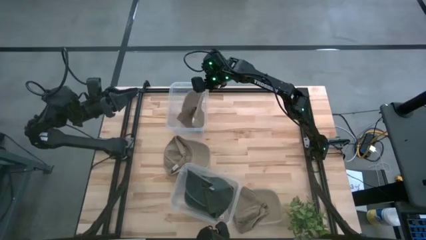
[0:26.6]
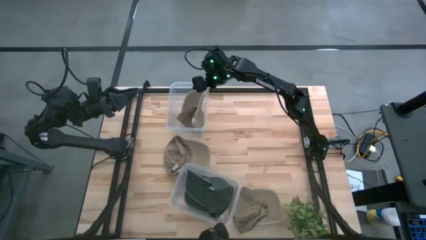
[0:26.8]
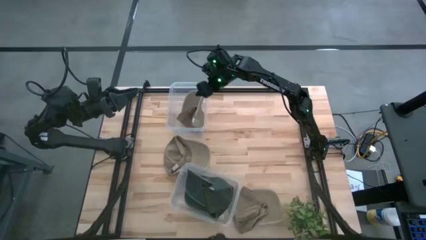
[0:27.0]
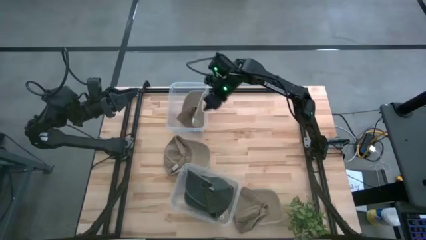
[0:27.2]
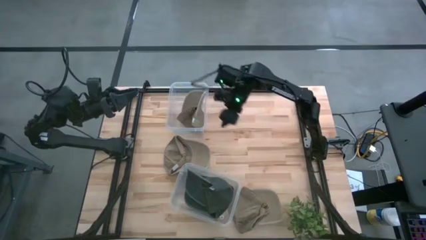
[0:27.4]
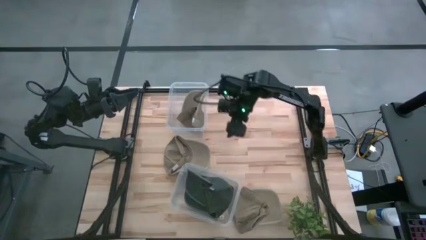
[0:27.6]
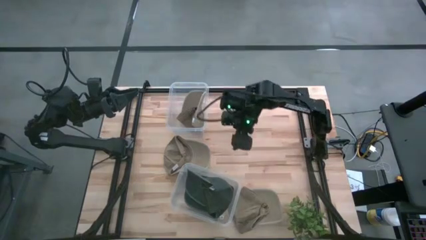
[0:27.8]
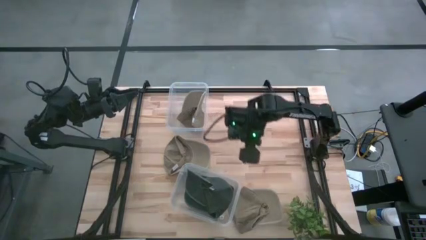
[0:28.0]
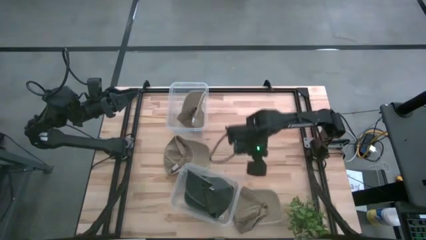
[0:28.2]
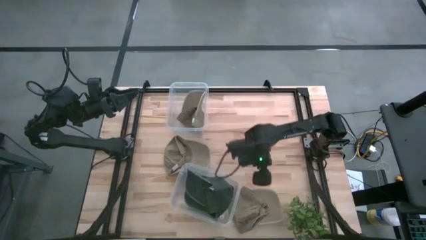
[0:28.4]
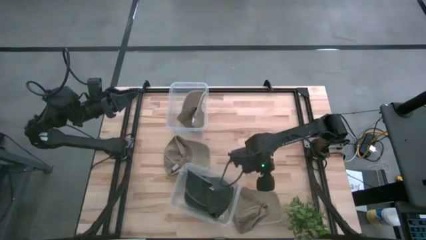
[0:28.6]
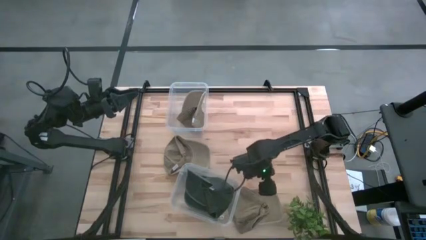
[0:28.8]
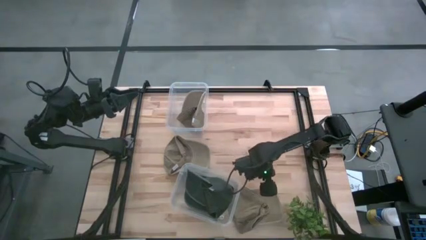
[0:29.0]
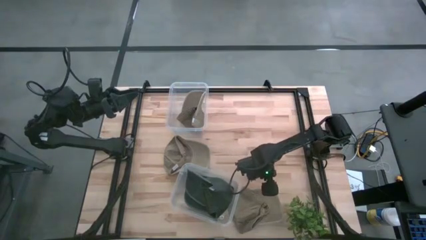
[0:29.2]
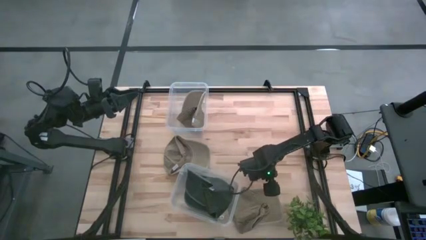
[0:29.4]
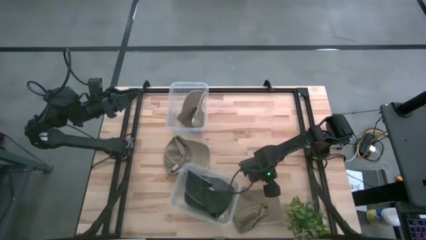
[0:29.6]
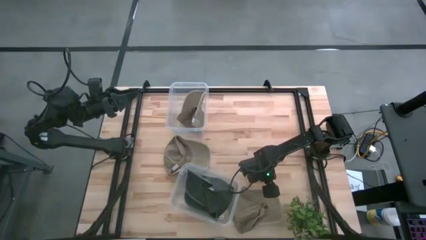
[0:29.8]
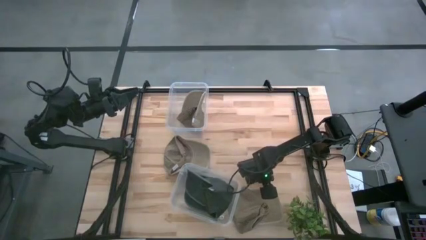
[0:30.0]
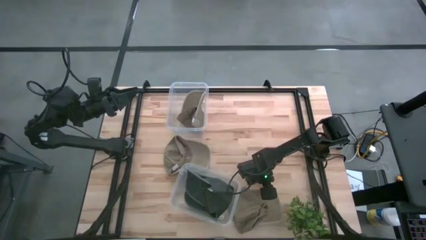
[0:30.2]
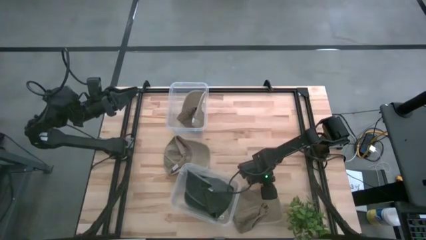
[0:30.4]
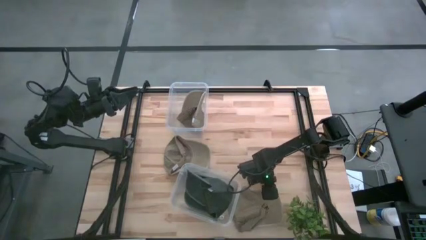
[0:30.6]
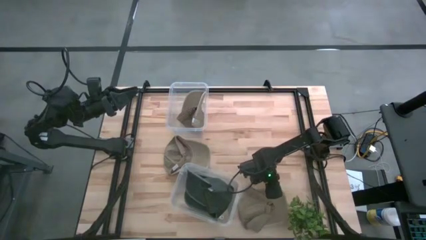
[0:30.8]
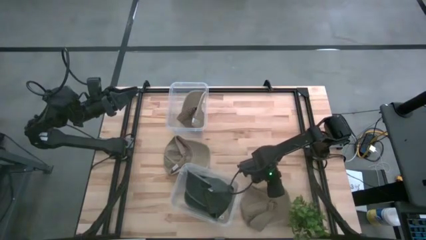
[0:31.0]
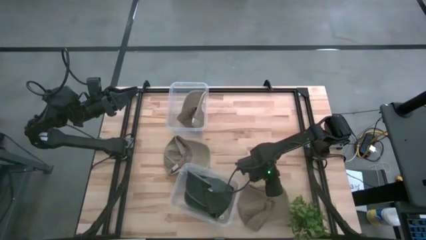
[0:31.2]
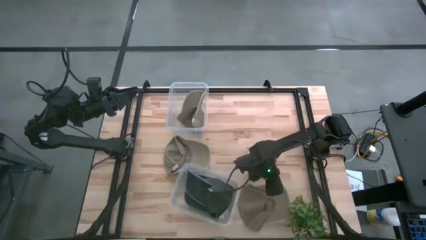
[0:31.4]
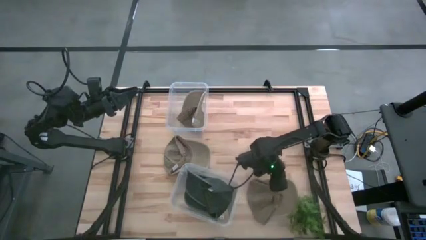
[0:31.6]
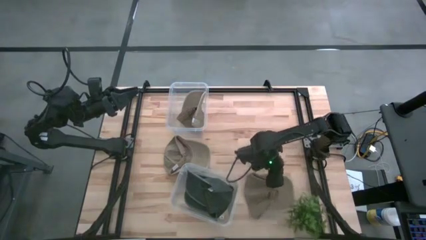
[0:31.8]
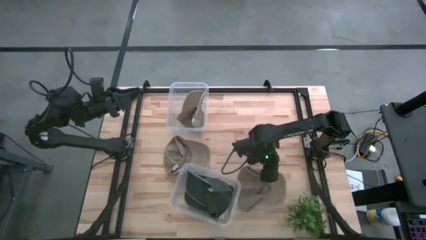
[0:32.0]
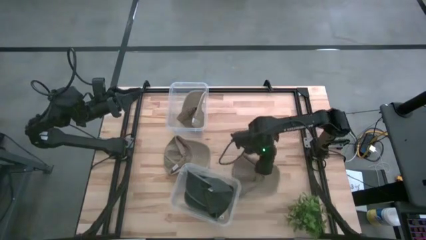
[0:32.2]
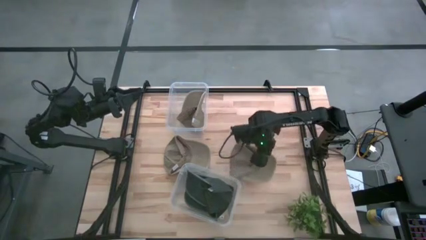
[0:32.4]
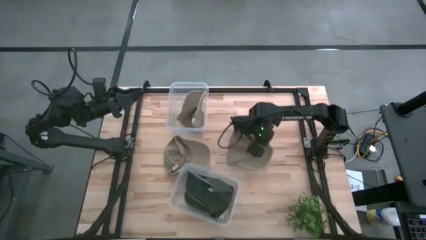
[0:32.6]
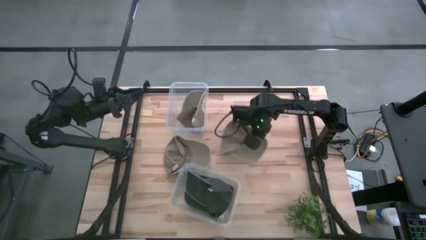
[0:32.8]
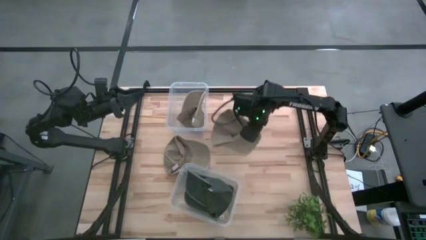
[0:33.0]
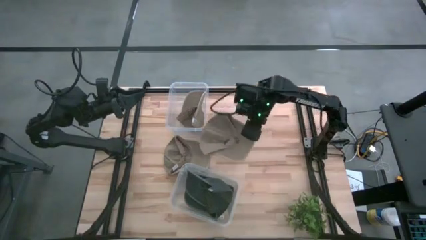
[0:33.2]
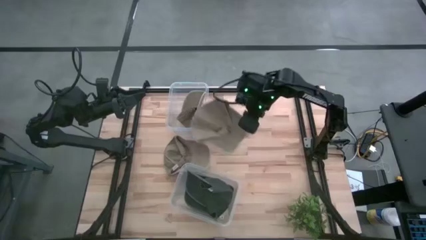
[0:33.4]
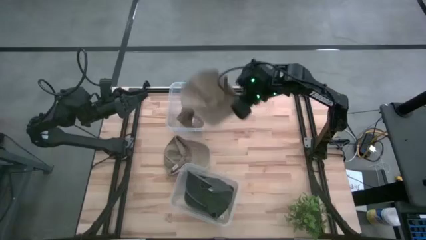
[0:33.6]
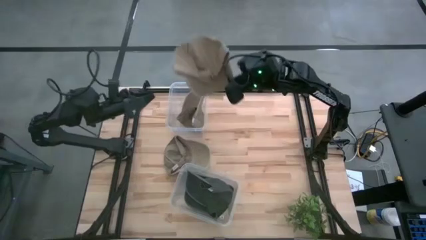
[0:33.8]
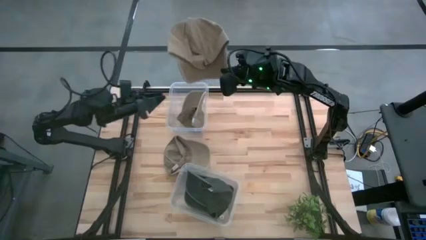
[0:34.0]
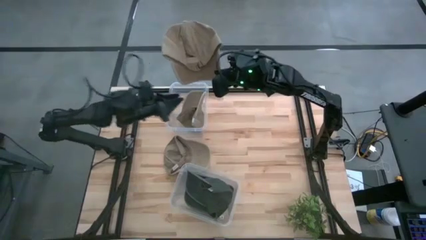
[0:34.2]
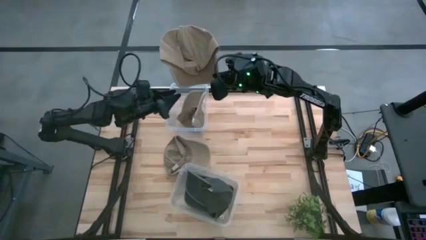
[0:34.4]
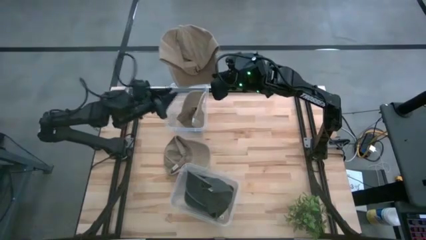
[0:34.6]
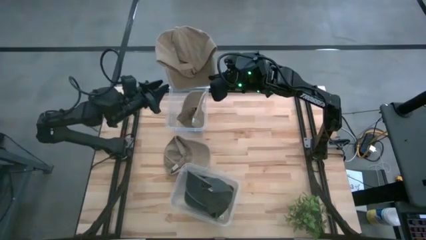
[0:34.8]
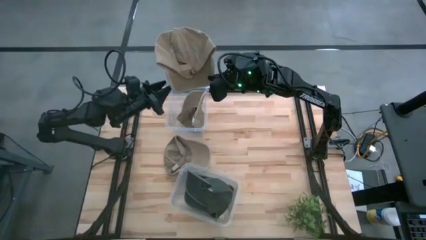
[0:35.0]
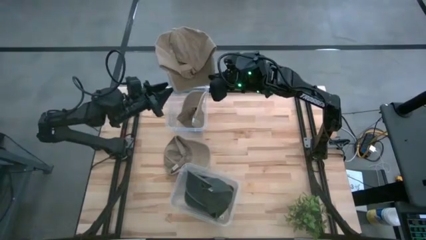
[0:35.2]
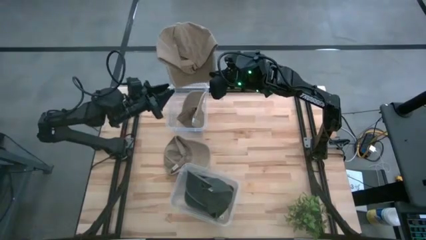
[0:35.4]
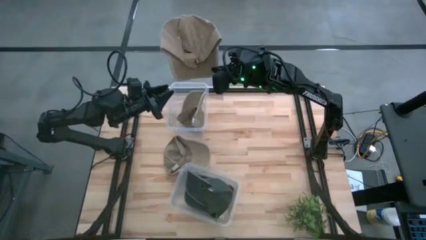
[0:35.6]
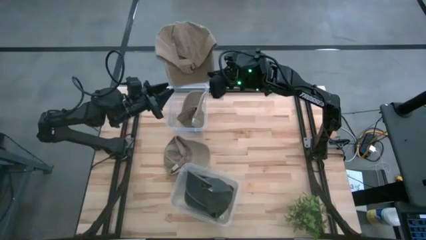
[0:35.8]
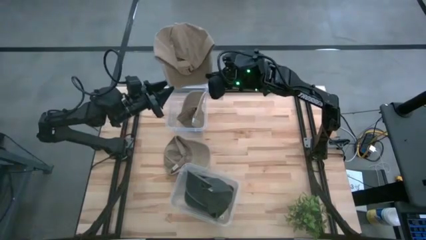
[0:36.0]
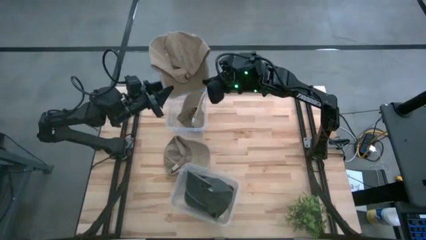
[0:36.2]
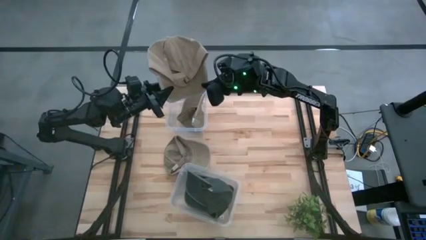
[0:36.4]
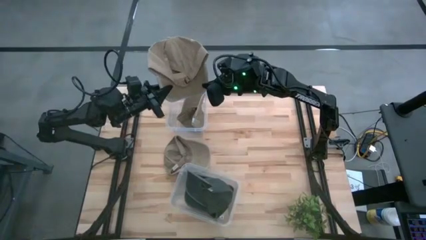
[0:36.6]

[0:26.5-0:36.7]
Task: Pick & Place hat
Put the bottom brown cap into the top transparent bin

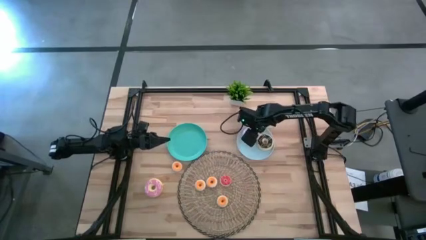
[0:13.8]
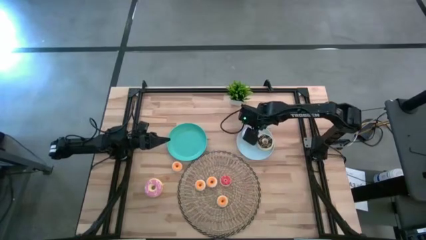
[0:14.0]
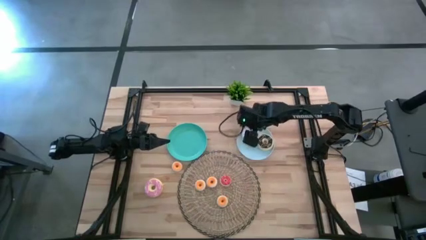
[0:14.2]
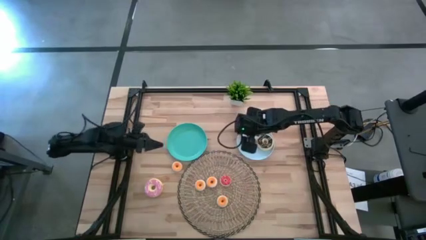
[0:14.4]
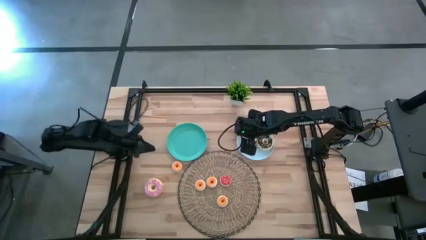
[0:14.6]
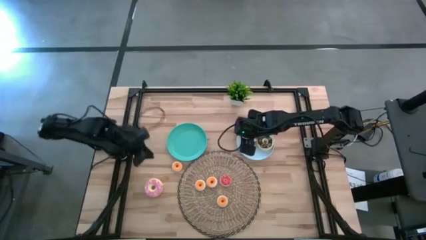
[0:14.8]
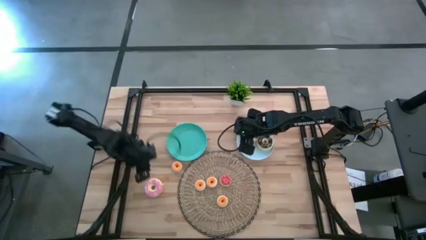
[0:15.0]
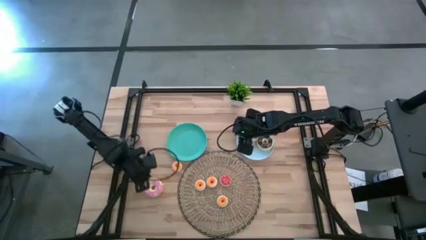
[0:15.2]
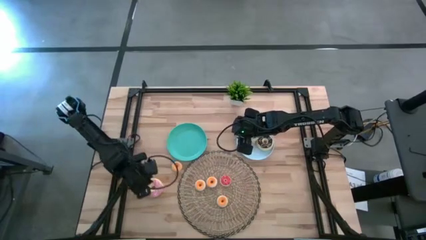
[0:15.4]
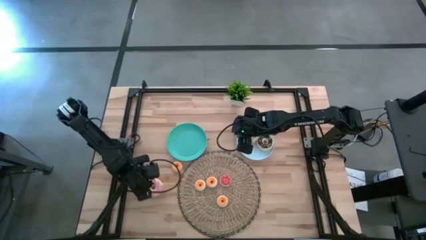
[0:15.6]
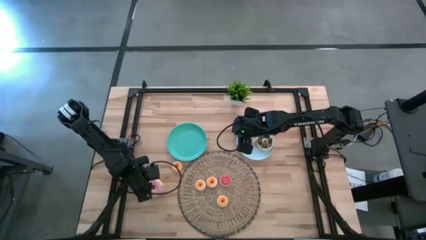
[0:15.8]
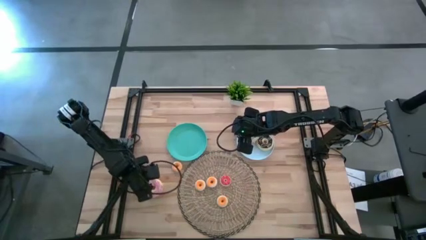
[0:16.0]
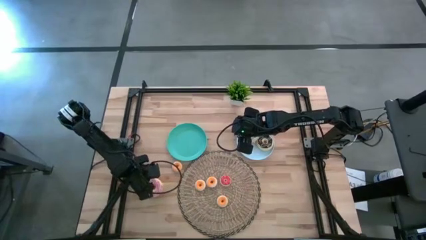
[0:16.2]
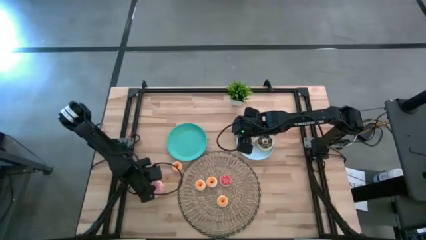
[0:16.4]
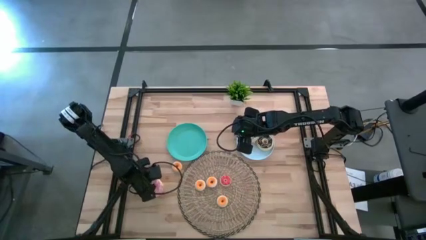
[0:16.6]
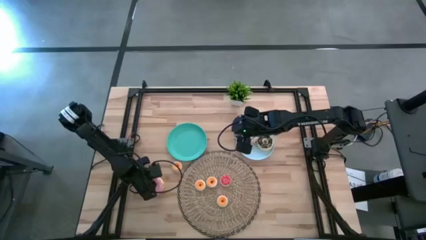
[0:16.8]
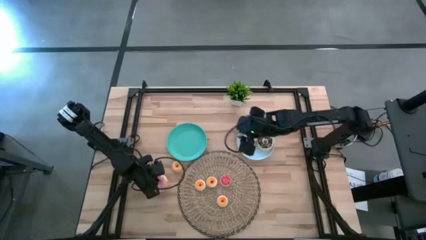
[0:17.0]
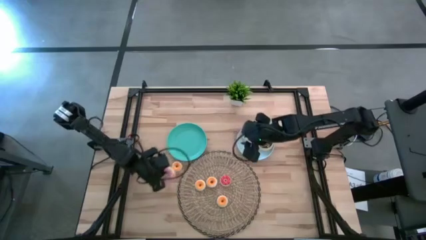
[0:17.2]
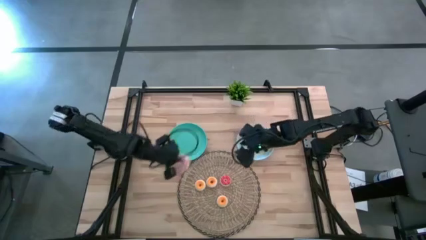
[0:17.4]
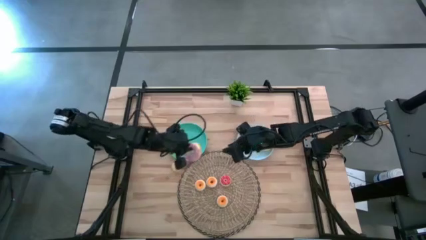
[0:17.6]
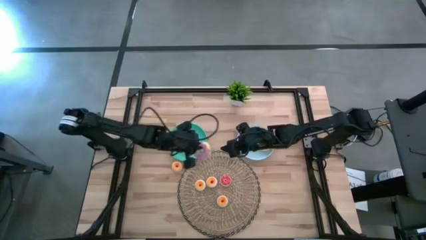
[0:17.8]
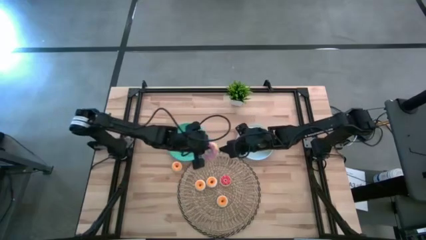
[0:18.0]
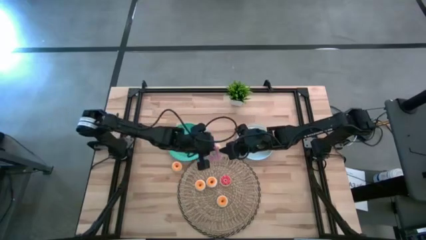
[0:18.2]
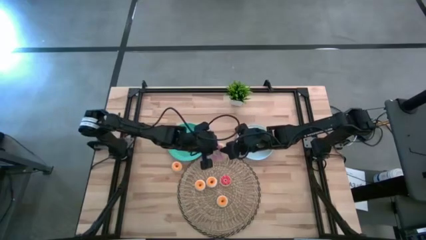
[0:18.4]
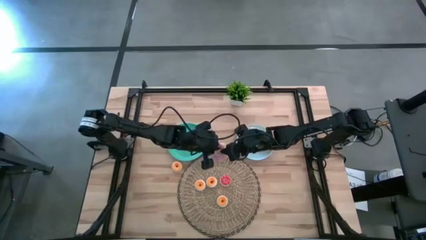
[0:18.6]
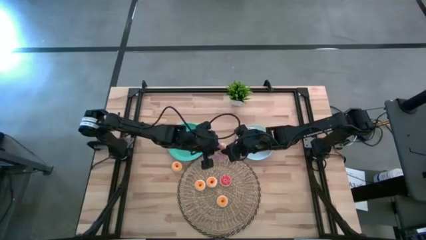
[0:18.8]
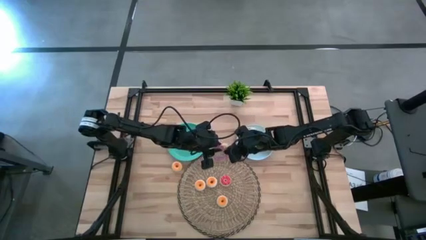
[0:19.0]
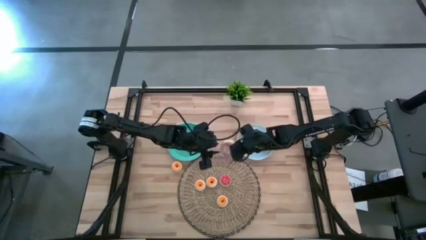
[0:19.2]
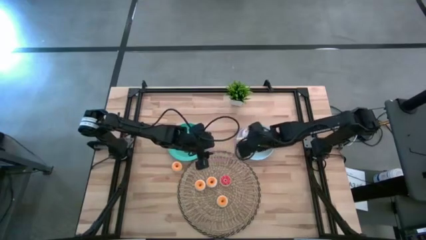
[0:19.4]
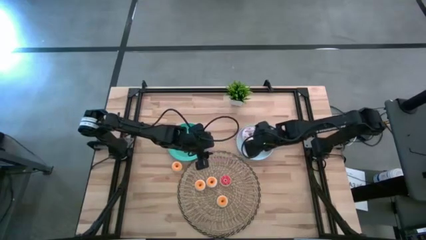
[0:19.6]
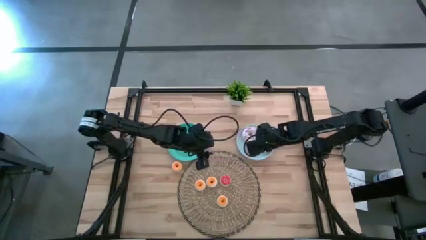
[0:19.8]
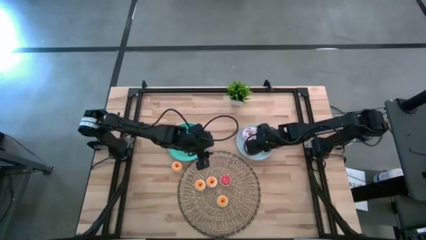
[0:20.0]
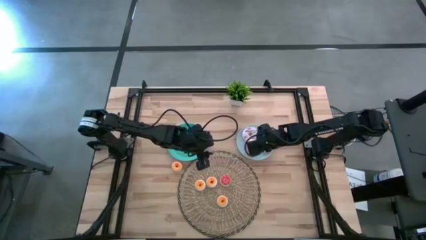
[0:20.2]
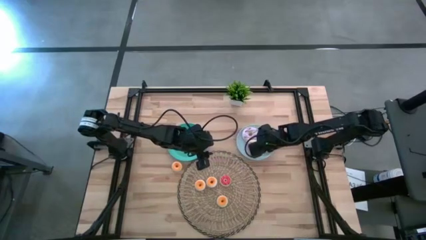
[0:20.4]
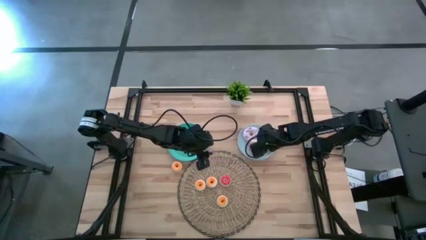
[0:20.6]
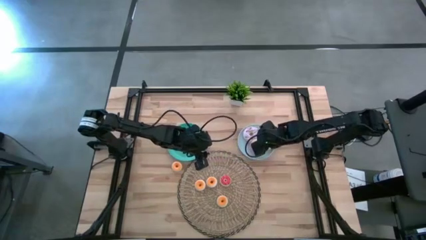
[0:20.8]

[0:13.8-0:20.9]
Task: Pick & Place donuts
Put the big pink doughnut on the light blue plate
